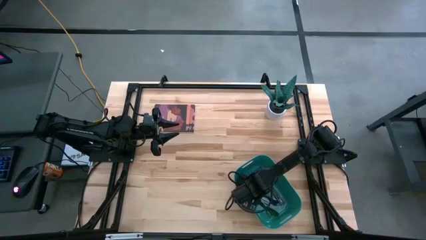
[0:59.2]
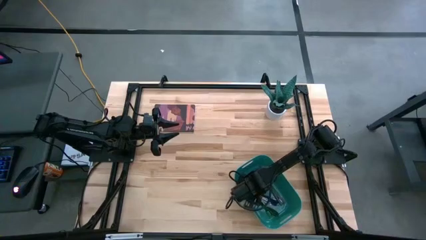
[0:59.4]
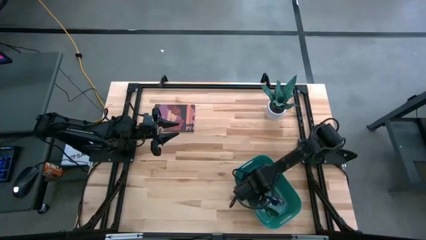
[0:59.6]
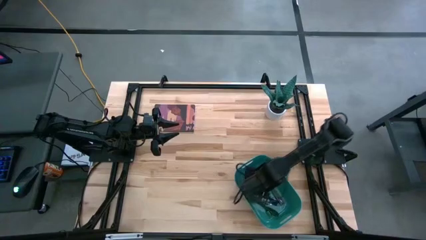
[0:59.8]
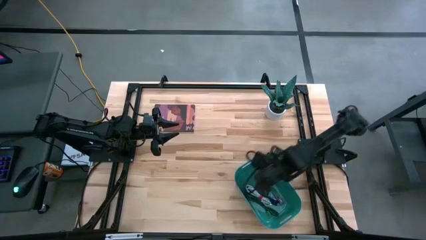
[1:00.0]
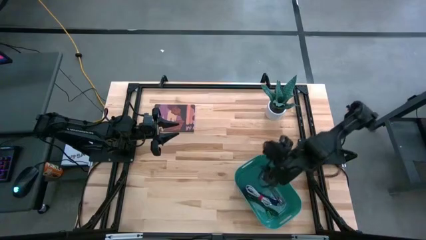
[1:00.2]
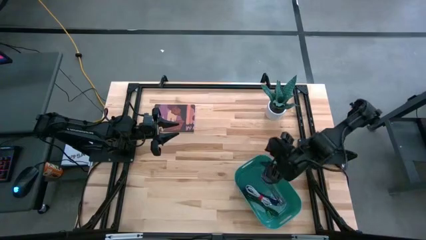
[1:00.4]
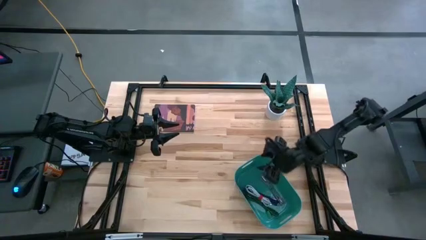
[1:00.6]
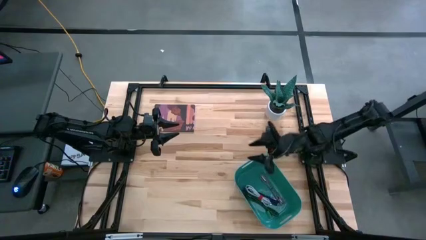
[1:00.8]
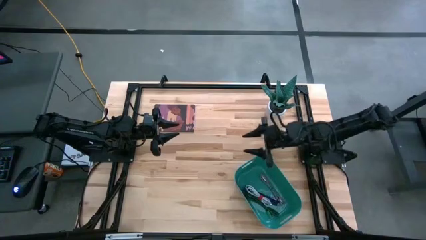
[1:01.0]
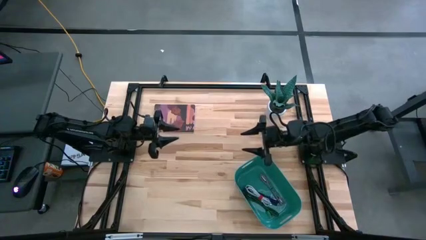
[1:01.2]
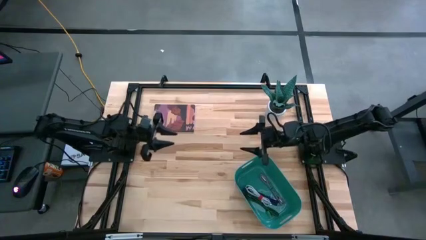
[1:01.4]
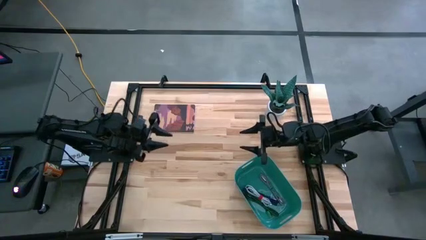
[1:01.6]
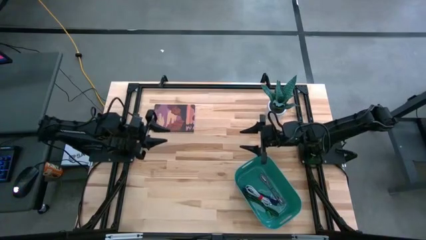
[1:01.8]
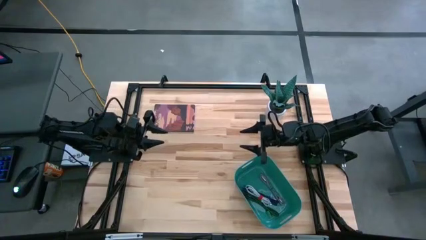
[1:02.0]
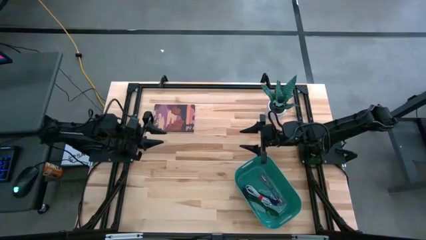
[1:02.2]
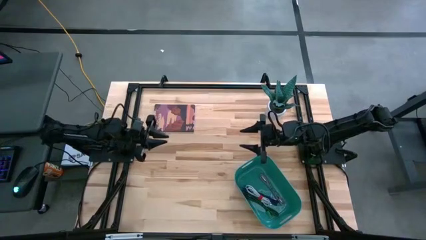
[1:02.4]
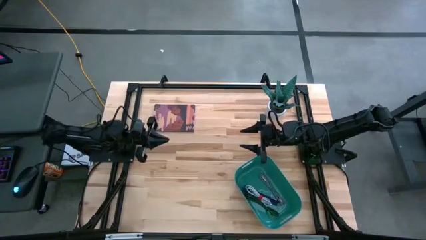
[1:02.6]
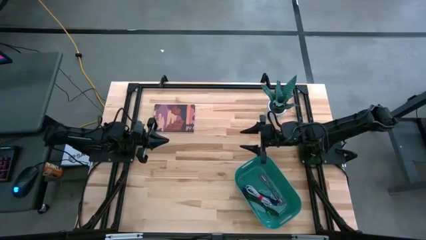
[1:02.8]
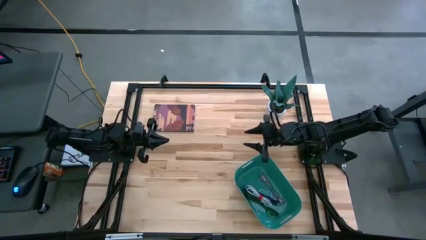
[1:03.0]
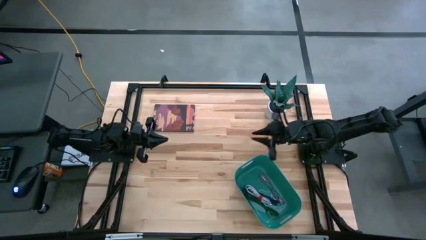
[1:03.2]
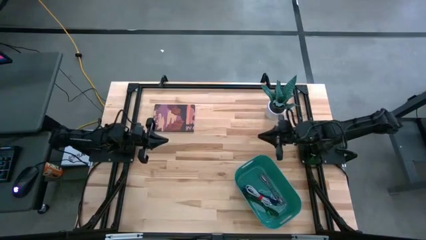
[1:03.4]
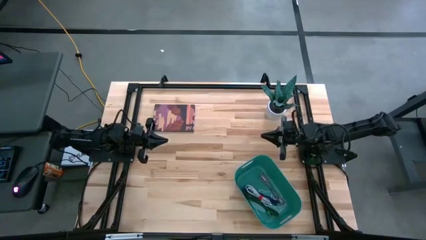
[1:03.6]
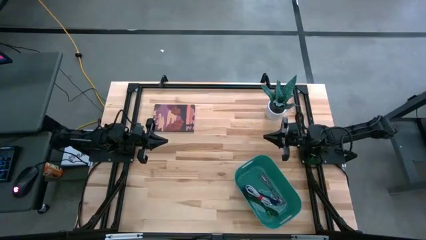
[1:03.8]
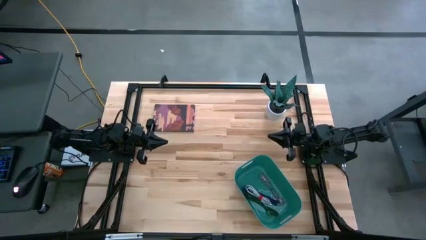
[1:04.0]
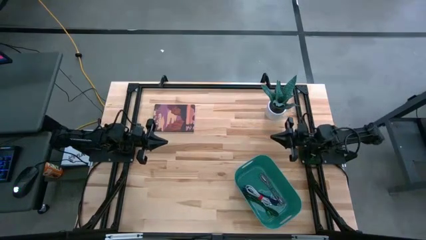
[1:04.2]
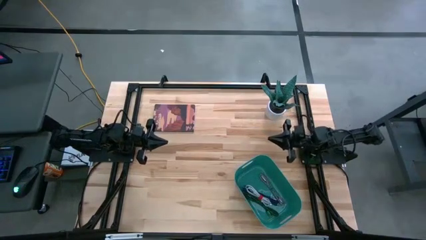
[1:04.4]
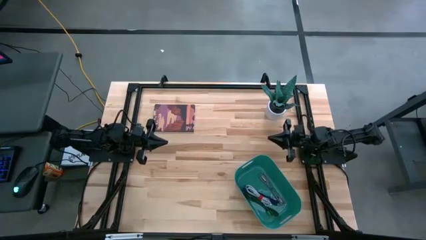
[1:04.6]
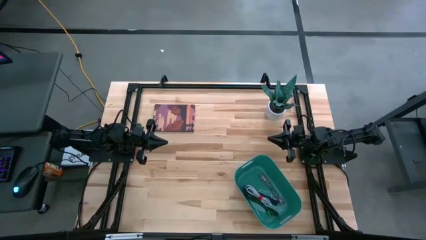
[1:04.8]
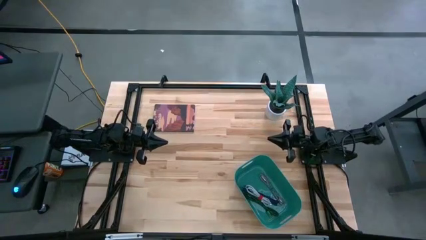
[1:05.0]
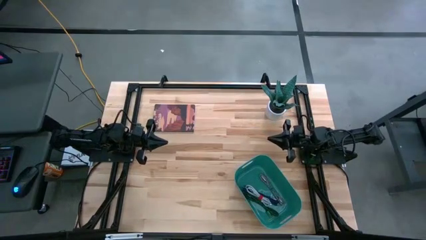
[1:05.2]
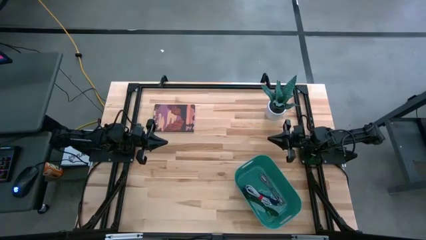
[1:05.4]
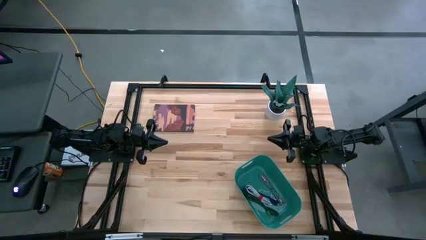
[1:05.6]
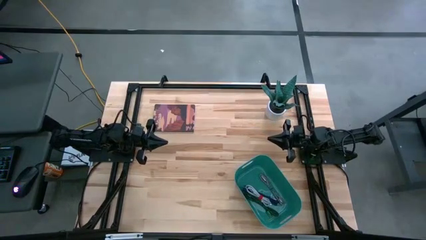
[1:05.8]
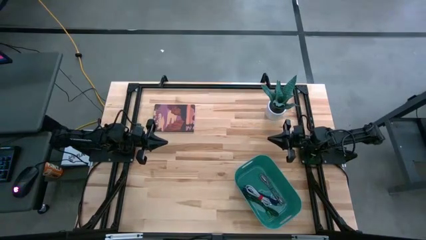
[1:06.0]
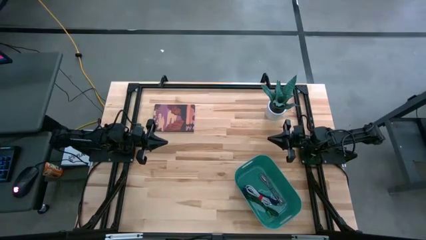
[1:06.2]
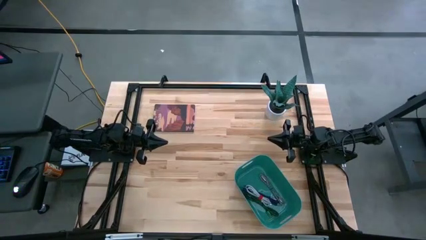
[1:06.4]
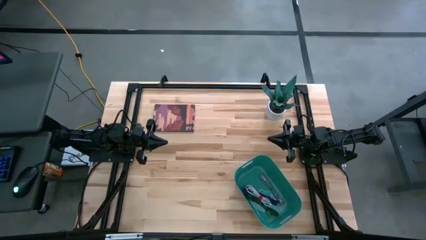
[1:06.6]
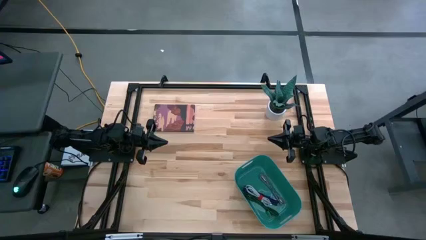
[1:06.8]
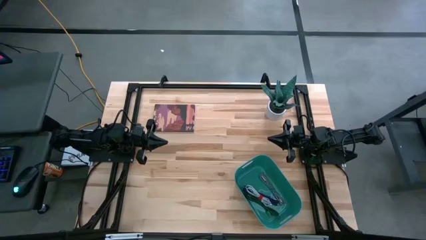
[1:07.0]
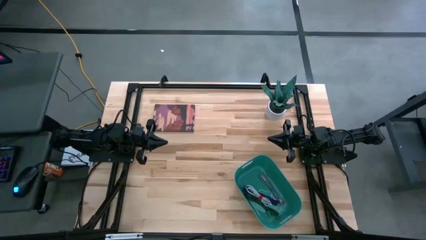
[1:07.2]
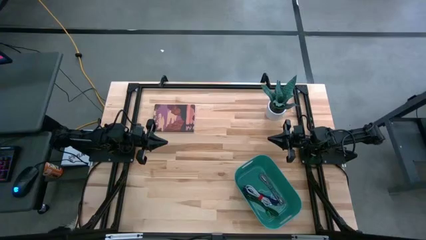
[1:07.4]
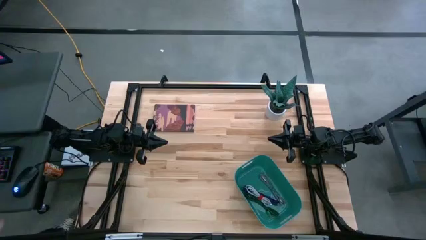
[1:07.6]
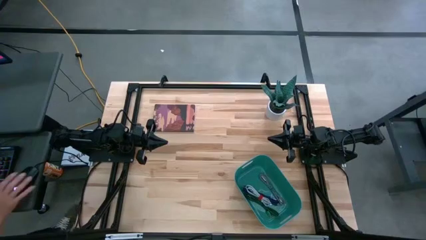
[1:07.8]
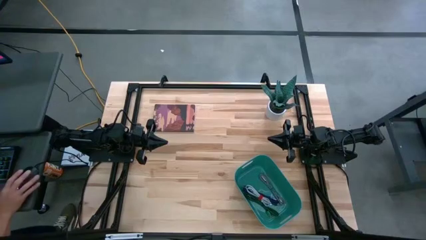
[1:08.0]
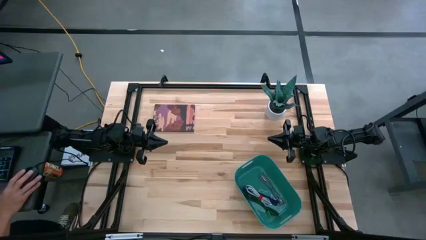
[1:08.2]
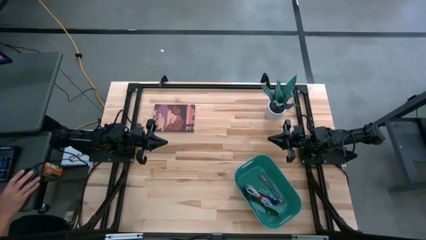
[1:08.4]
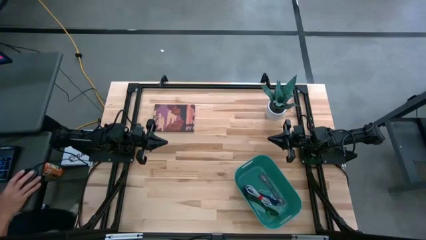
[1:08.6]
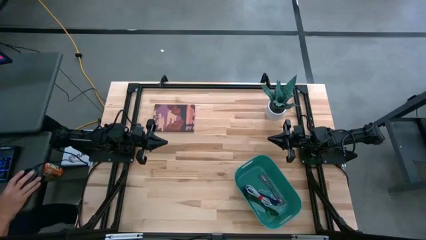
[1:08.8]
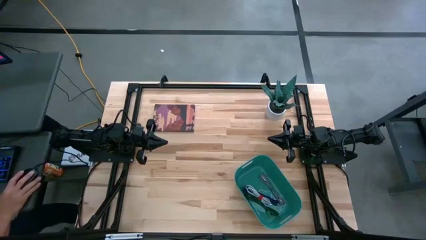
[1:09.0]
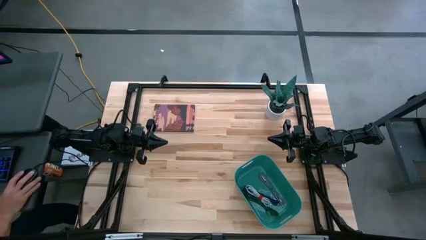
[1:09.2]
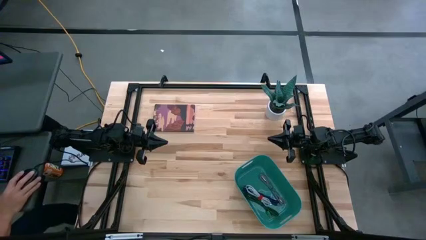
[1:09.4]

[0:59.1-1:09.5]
Task: Pick and place USB-C Cables
Return to Home Position

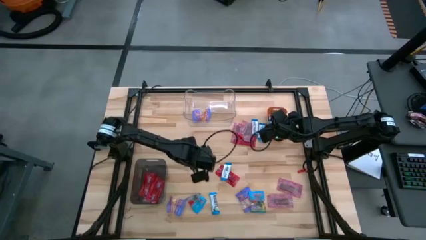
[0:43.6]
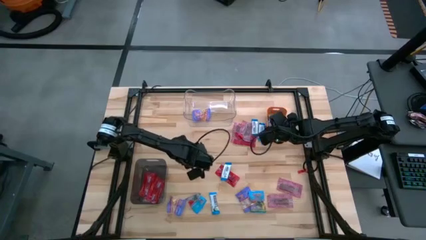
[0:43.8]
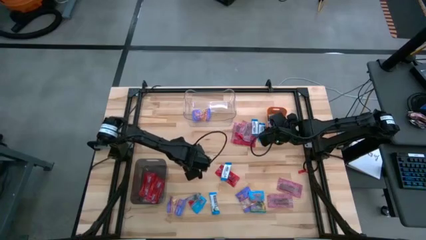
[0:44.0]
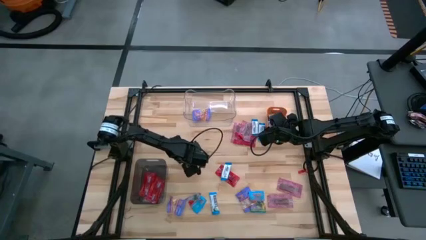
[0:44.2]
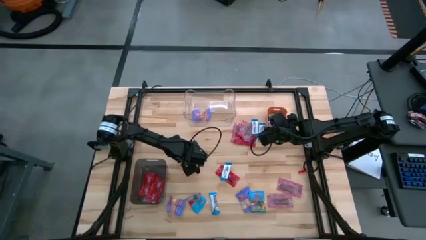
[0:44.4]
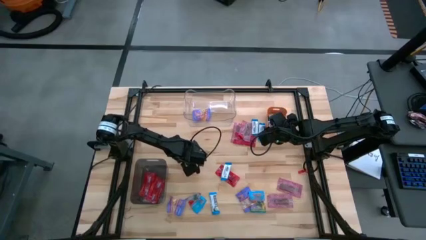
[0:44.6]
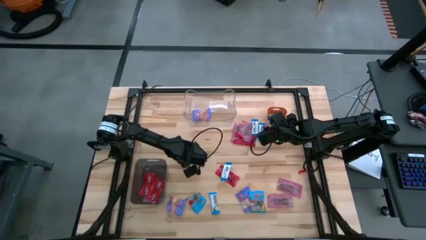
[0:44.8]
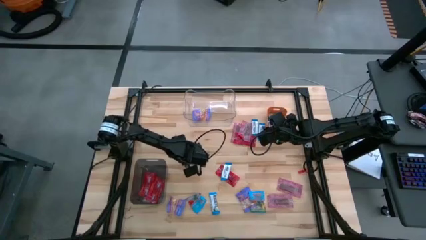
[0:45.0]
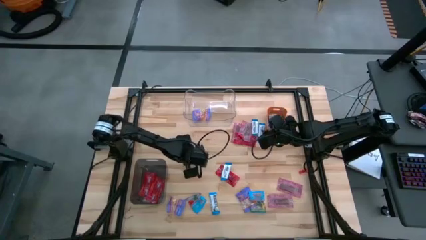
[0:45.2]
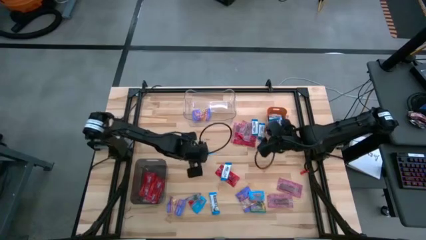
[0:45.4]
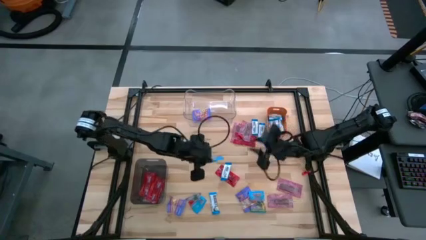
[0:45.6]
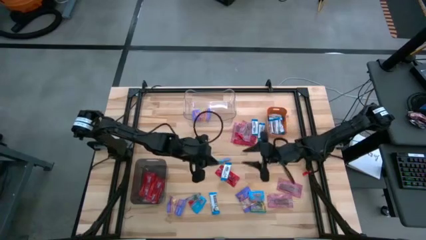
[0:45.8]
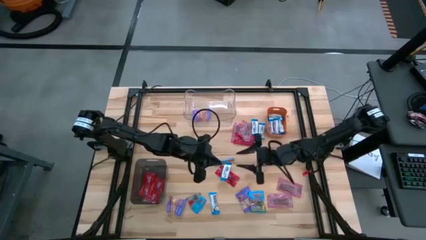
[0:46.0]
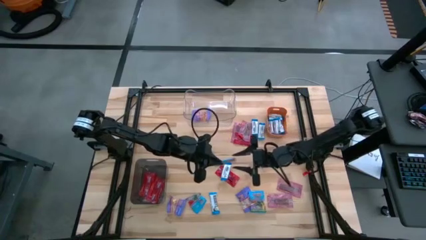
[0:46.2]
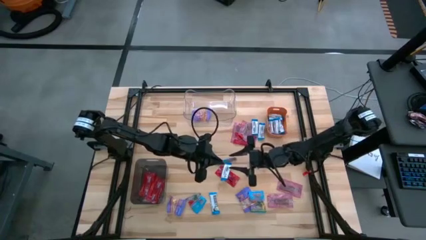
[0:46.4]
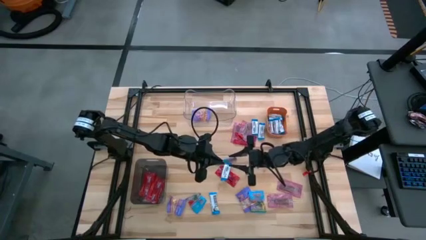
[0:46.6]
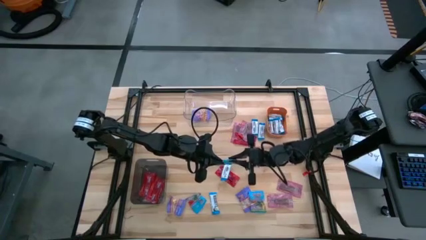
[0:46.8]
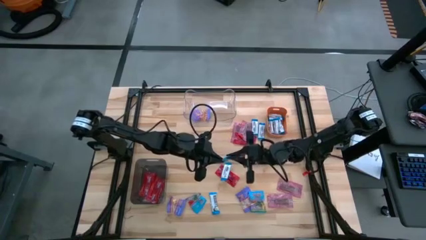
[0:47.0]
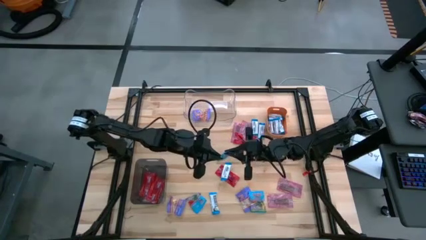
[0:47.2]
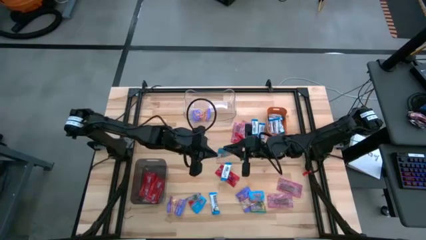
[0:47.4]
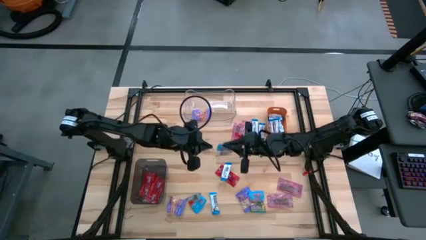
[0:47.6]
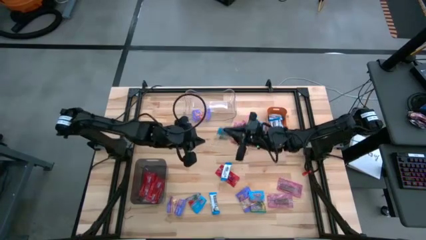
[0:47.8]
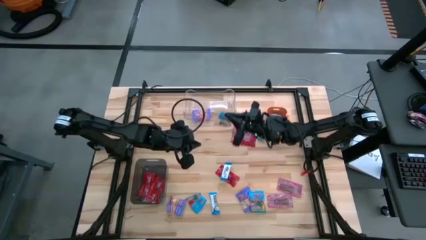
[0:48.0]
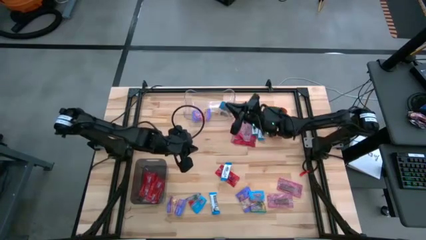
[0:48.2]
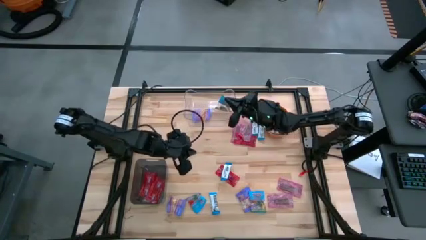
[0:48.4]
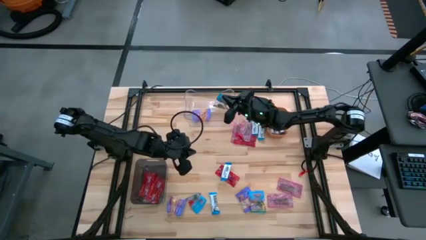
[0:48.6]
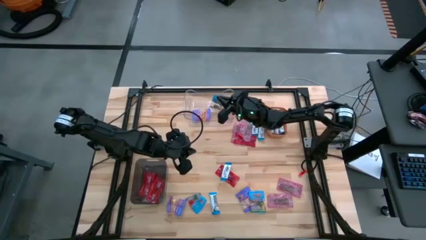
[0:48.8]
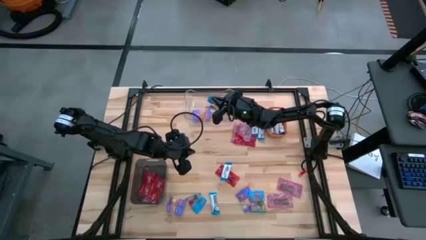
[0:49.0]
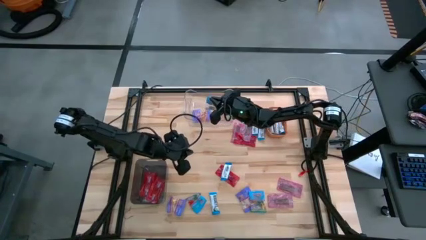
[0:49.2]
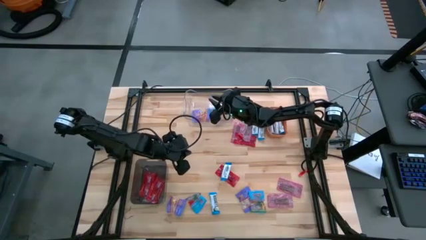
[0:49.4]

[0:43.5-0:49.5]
Task: Sort candy
Put the light blue gummy into the transparent bin
